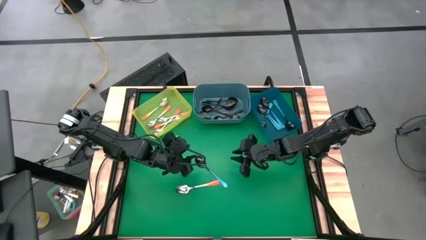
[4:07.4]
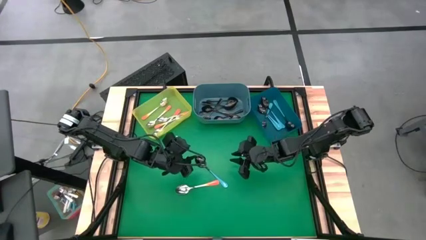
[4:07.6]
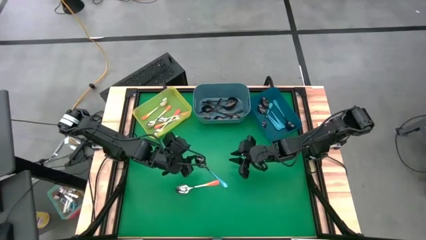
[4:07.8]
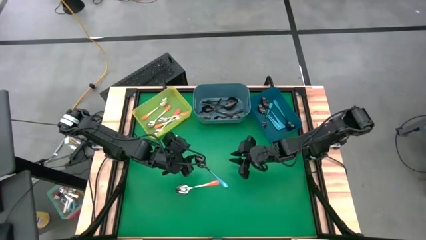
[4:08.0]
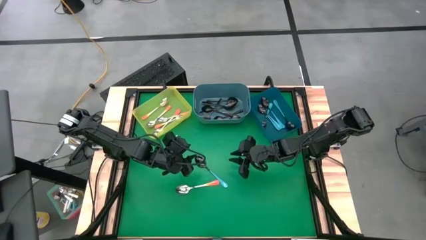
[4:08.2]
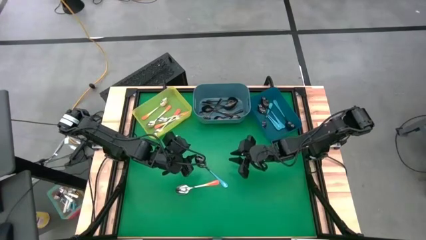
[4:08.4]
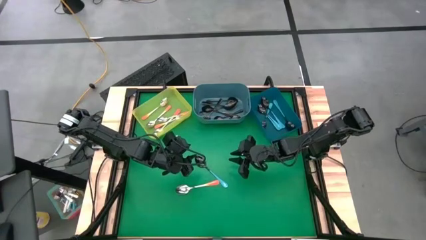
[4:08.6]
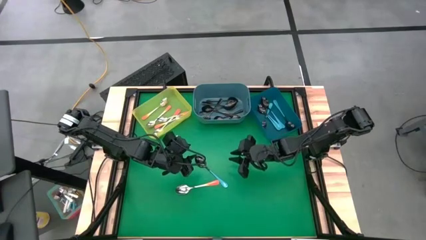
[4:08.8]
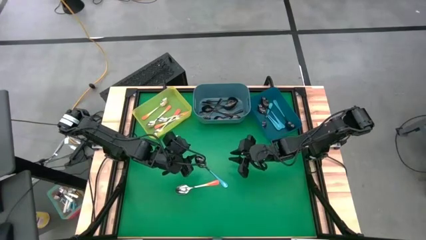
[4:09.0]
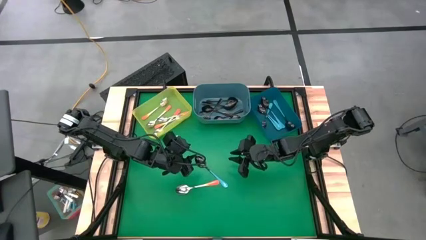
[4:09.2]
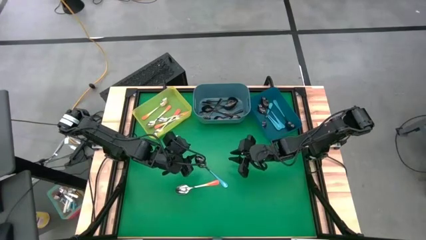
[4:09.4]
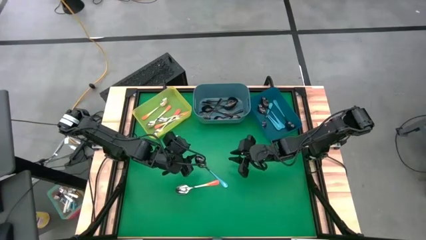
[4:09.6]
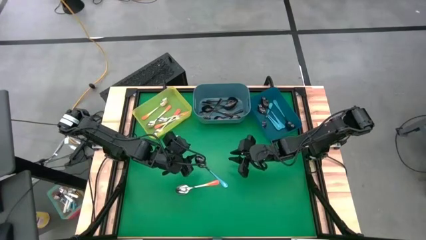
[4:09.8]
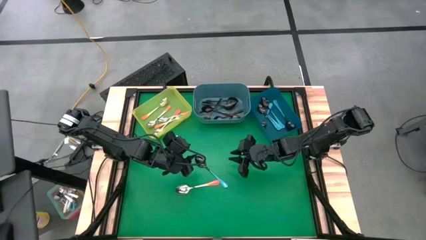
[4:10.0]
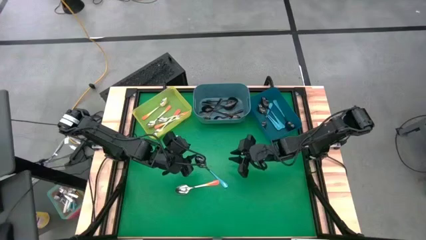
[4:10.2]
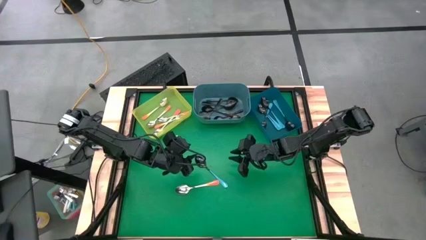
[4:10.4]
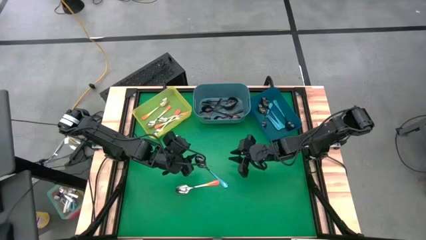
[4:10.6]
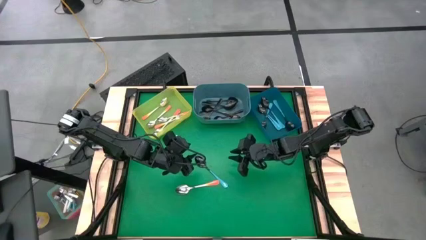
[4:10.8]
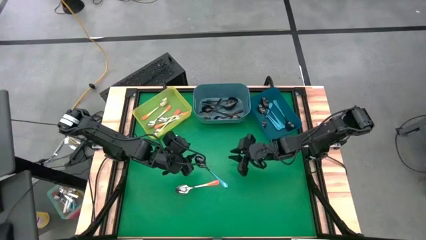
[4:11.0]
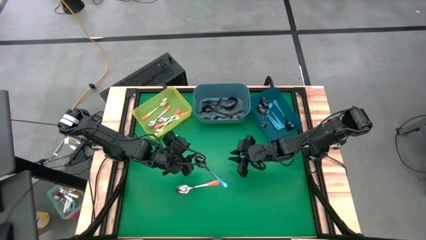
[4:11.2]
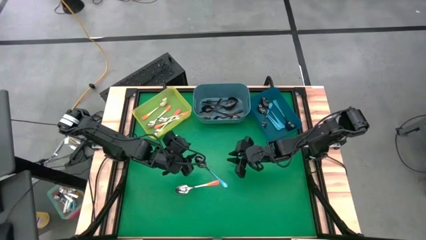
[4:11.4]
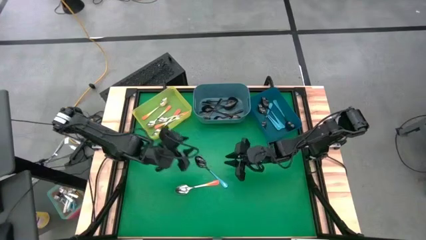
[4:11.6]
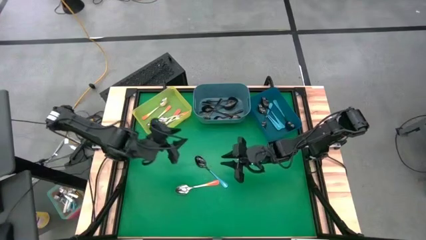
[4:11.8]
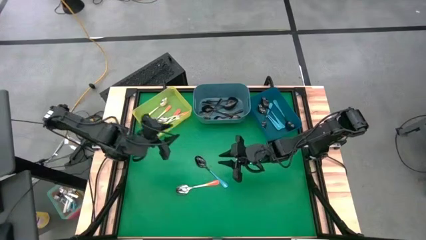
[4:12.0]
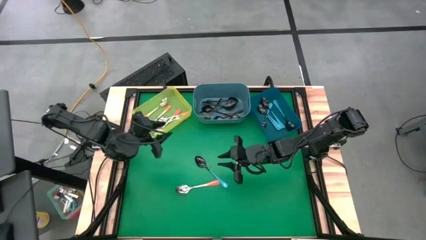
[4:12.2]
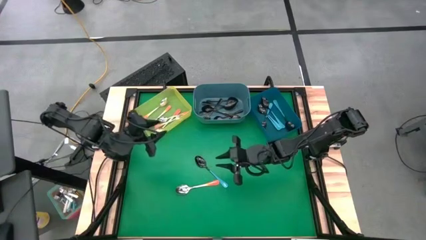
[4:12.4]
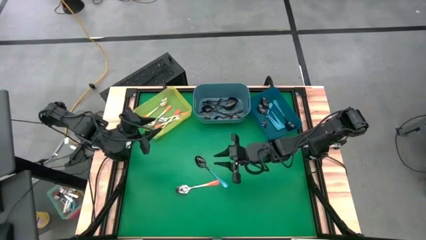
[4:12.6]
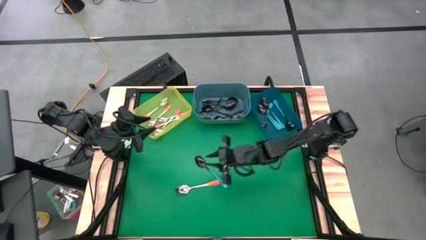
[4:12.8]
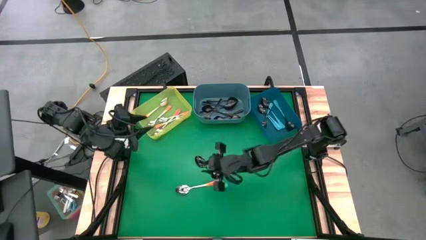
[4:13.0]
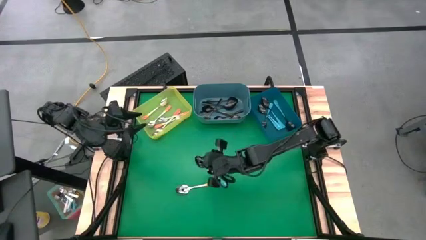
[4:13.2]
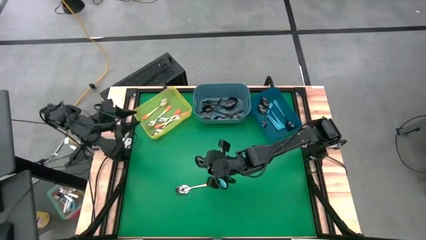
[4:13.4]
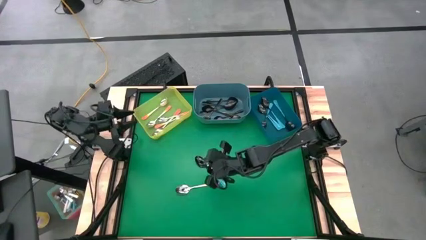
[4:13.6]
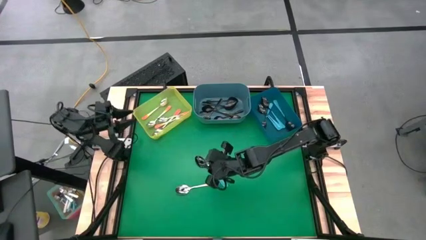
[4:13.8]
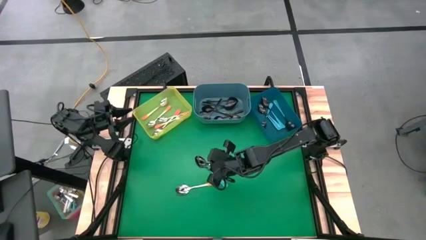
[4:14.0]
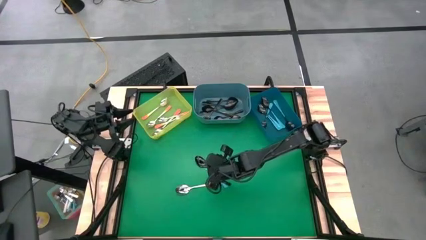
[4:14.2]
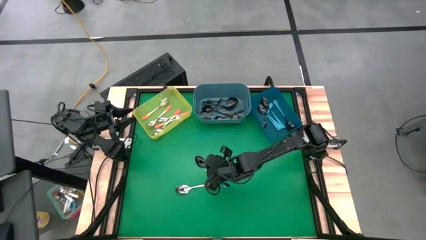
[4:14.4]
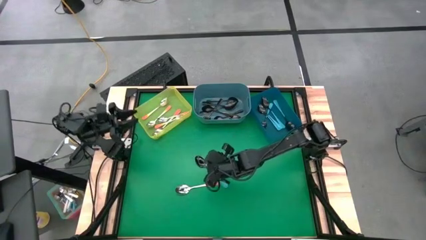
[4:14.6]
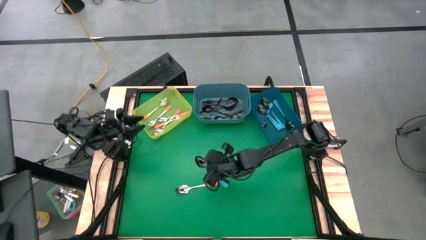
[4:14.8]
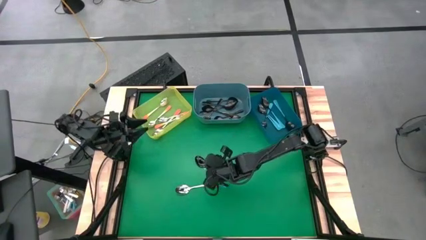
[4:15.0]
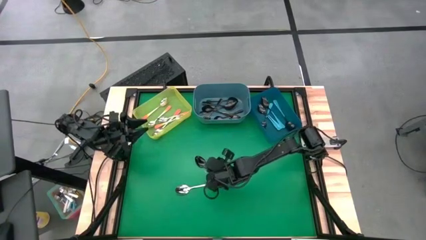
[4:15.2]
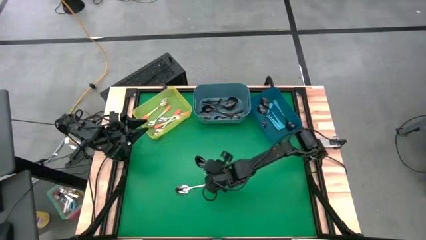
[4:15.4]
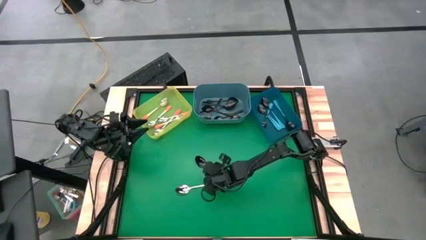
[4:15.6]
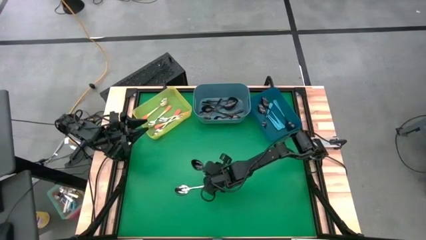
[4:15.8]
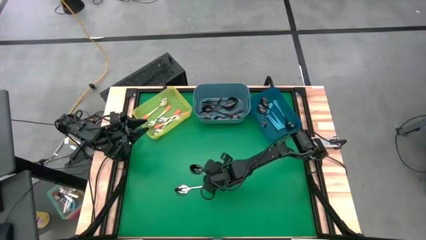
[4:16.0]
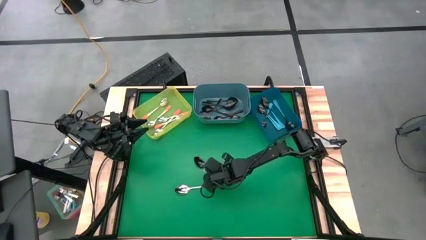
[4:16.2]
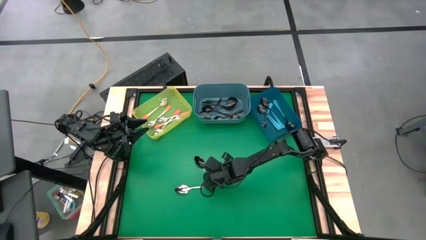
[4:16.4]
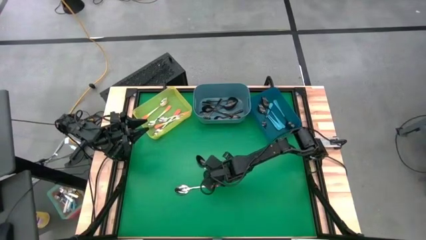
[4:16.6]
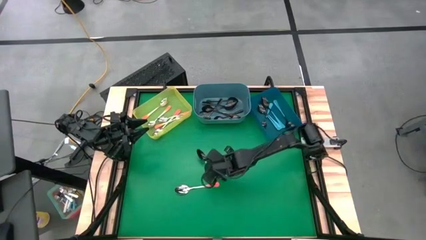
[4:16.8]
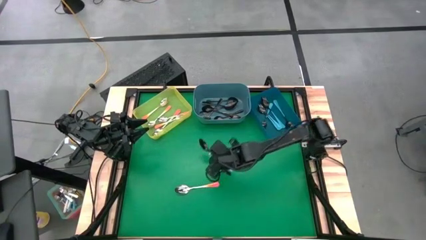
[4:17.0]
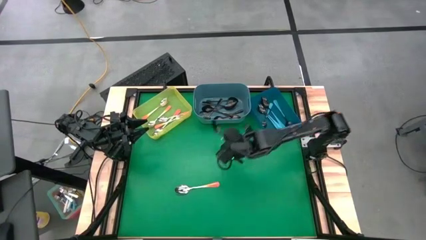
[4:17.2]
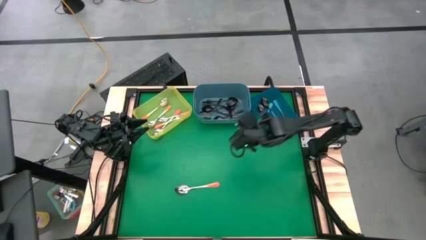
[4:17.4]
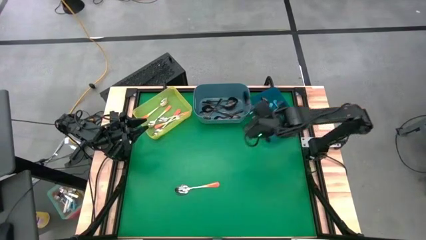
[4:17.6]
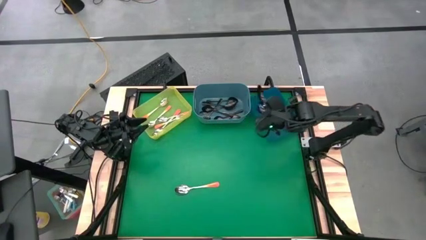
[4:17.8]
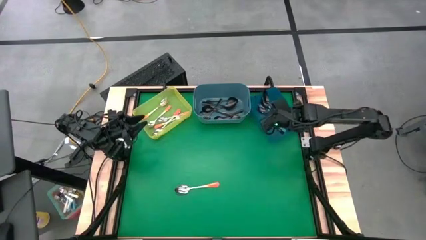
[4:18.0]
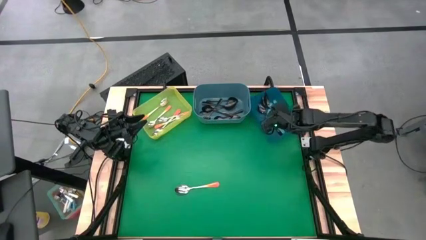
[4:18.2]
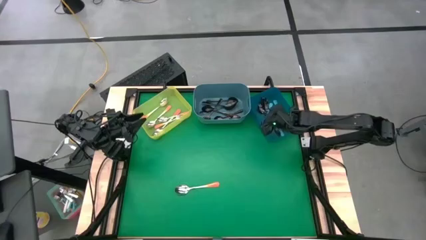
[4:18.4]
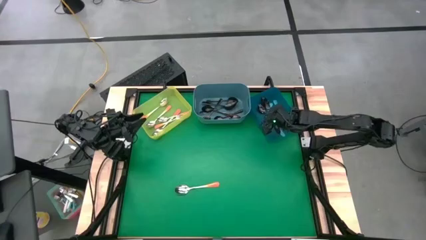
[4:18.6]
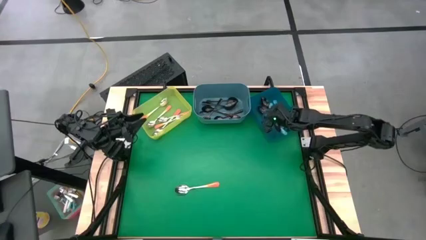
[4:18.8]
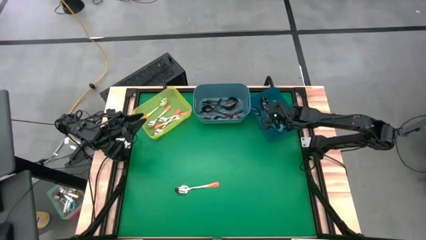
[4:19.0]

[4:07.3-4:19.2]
Task: Sort silverware by color (type)
Put the blue spoon into the blue bin

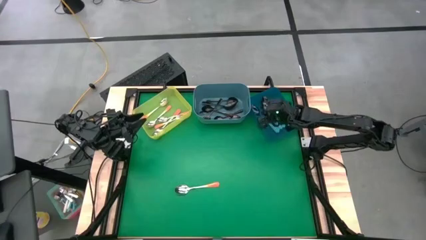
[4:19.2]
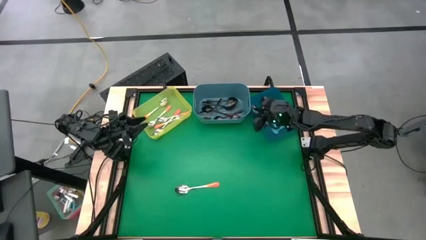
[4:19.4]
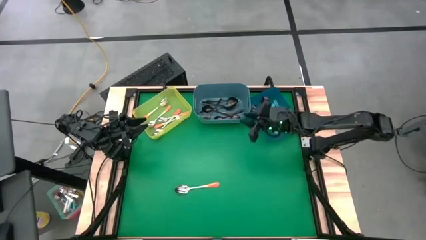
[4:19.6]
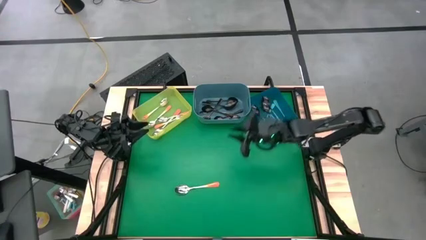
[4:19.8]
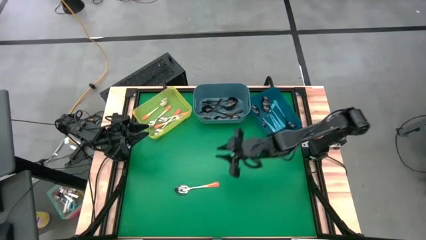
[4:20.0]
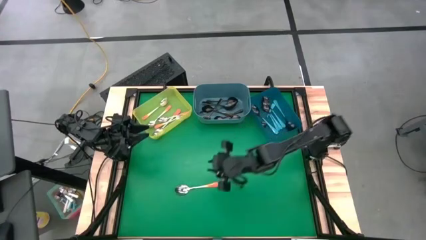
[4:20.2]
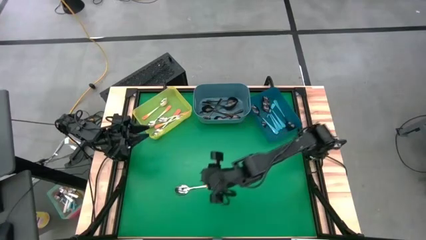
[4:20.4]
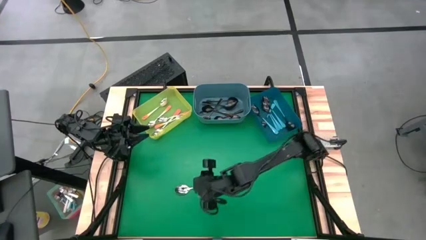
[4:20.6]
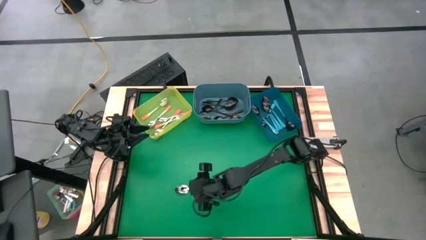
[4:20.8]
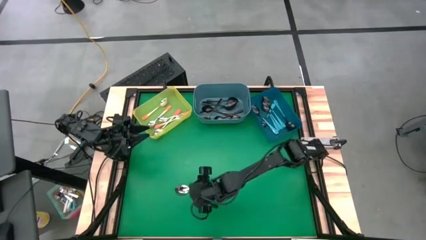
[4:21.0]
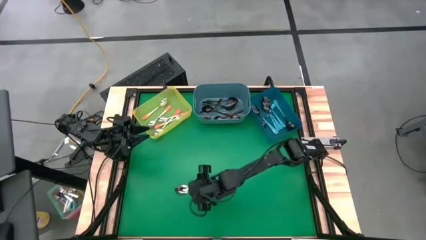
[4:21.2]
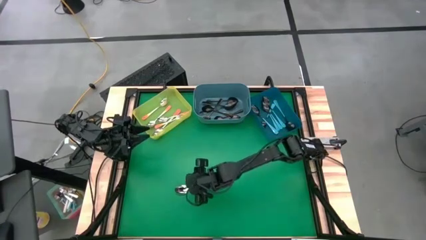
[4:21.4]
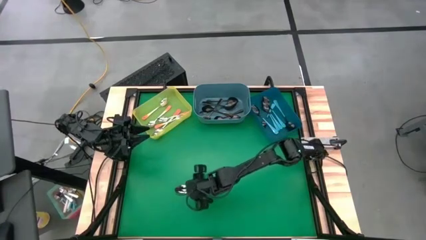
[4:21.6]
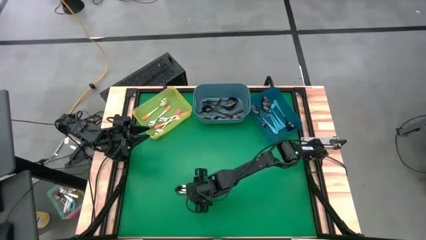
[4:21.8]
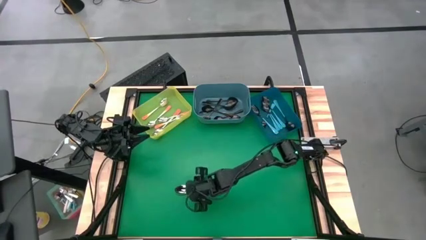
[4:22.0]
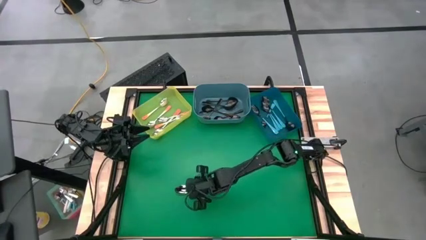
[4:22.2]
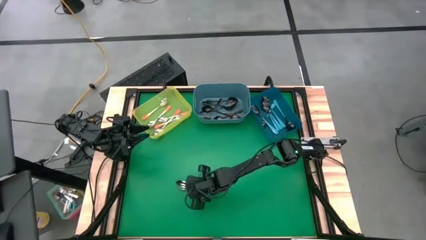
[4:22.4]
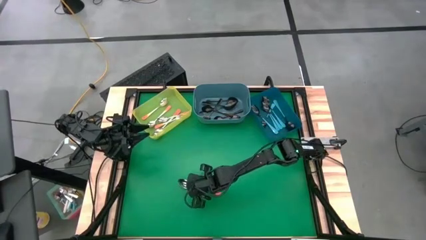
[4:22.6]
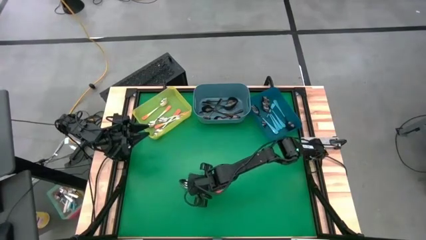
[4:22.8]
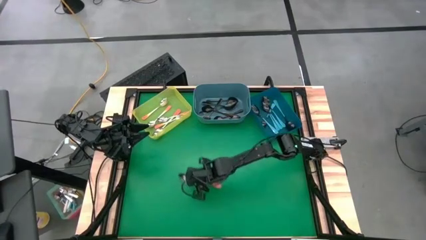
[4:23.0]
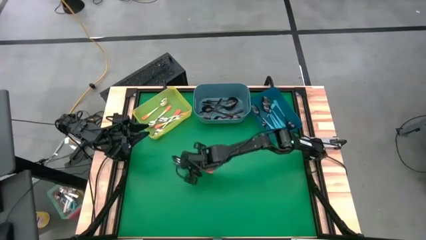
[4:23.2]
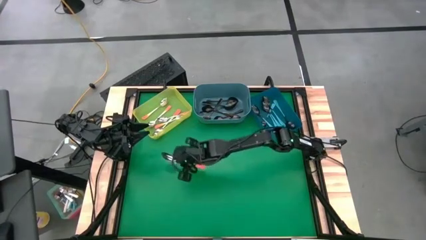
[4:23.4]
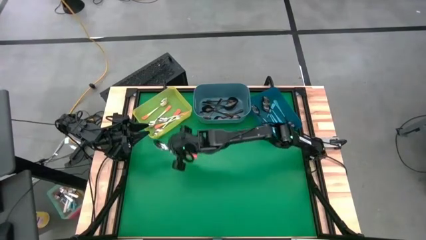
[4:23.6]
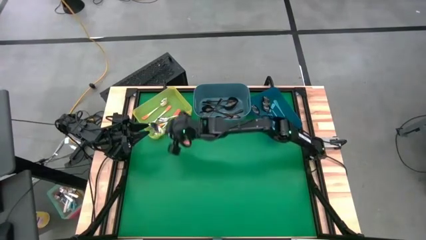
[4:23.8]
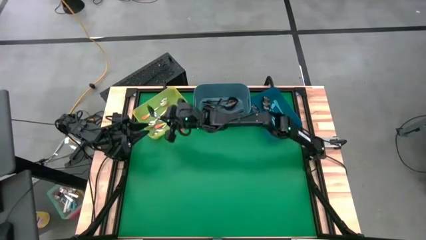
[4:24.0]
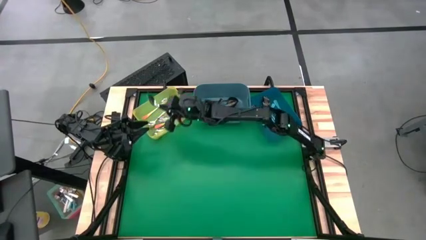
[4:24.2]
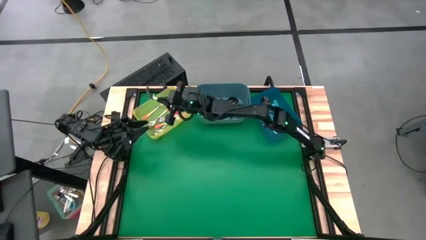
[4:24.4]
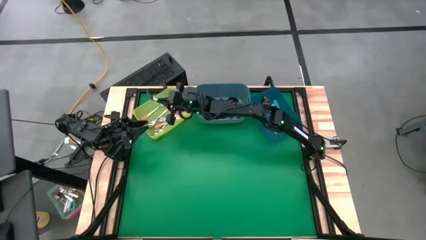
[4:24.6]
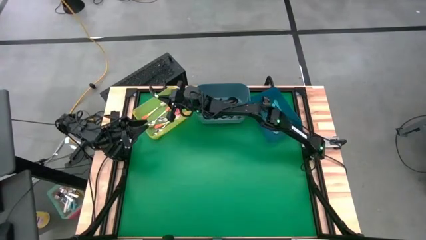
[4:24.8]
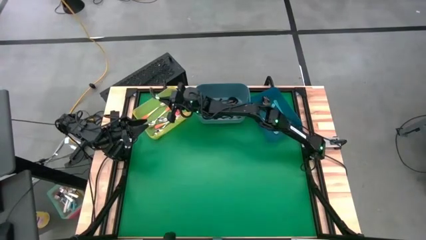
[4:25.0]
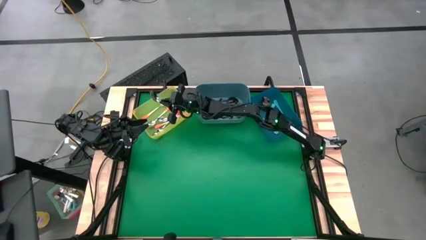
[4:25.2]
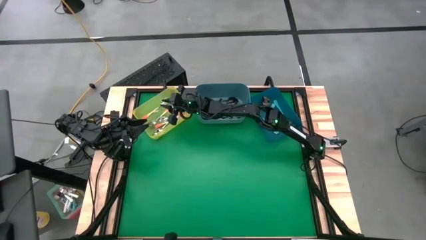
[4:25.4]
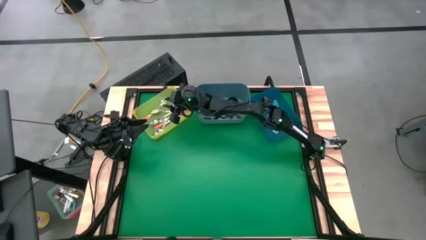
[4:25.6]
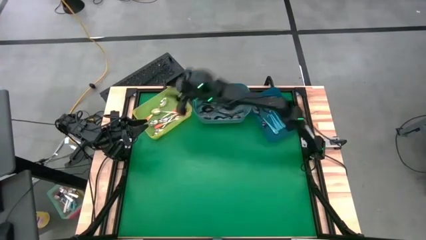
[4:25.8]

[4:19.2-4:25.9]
Put the orange spoon into the yellow bin
